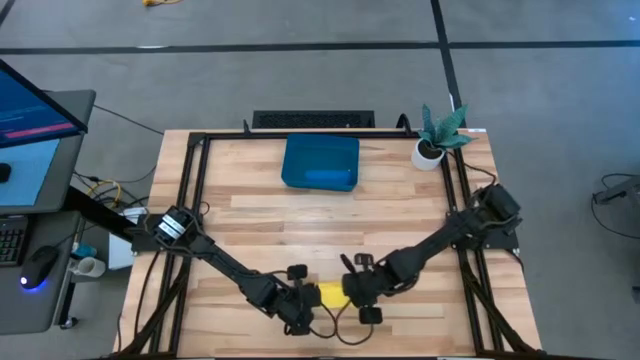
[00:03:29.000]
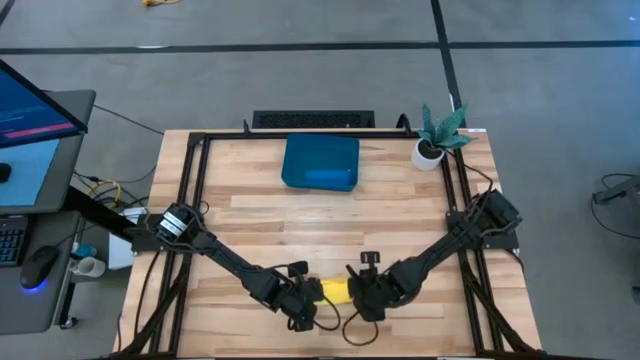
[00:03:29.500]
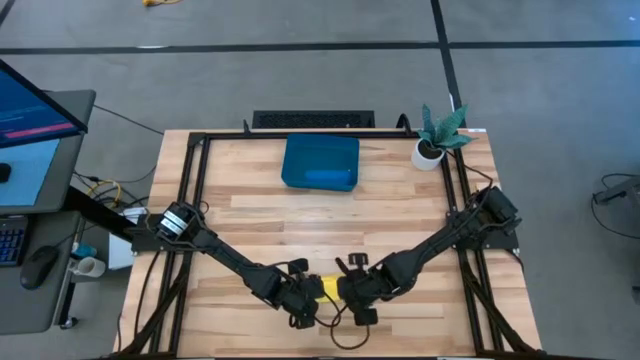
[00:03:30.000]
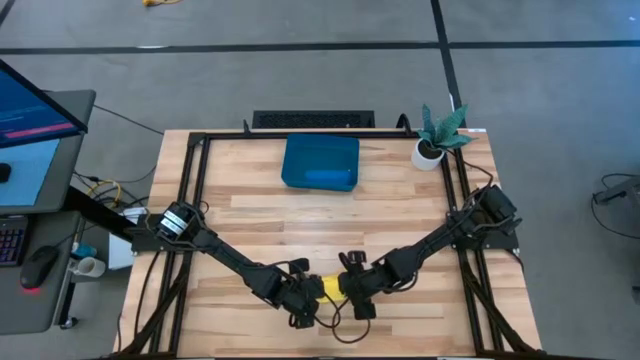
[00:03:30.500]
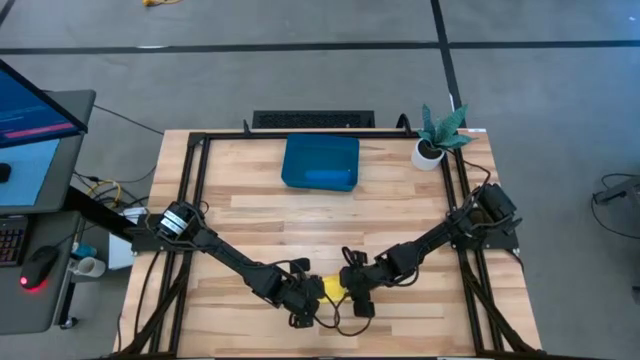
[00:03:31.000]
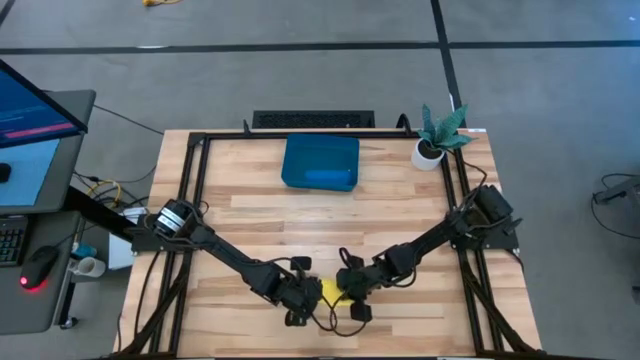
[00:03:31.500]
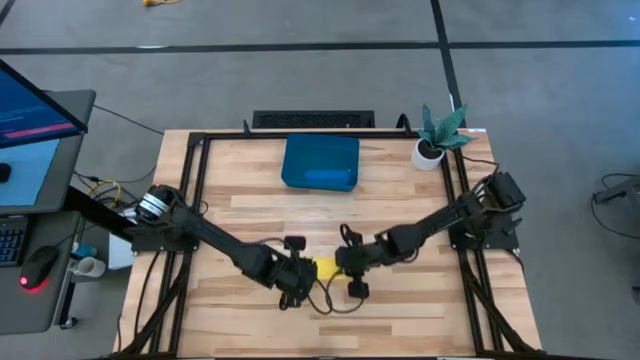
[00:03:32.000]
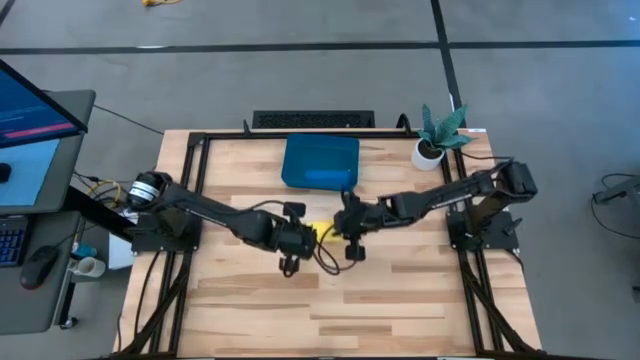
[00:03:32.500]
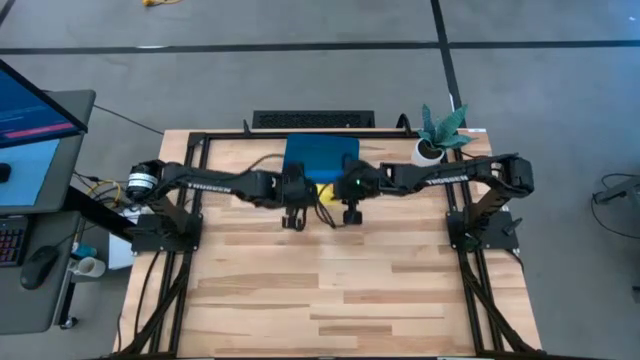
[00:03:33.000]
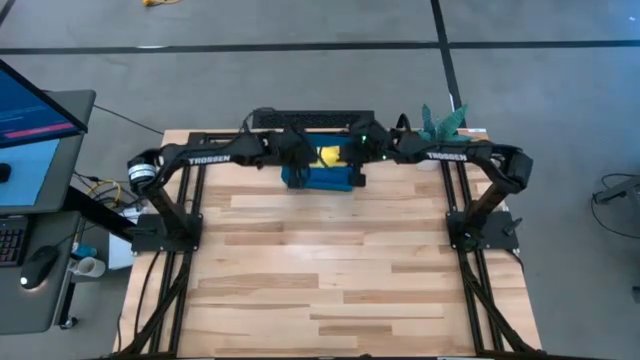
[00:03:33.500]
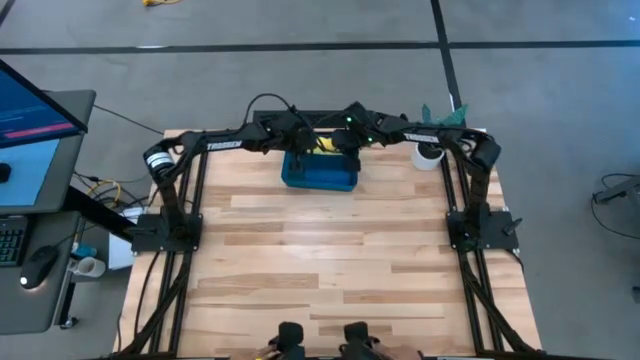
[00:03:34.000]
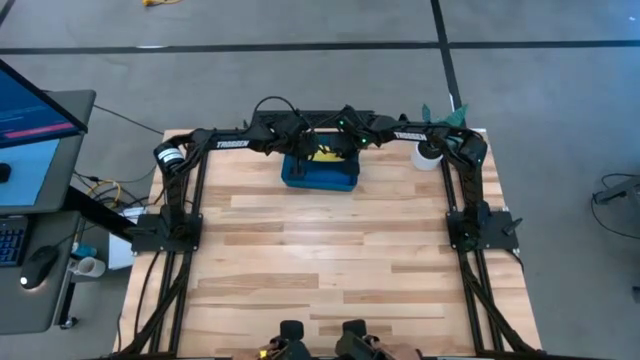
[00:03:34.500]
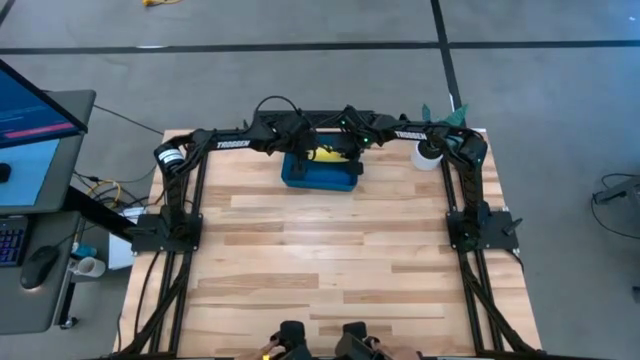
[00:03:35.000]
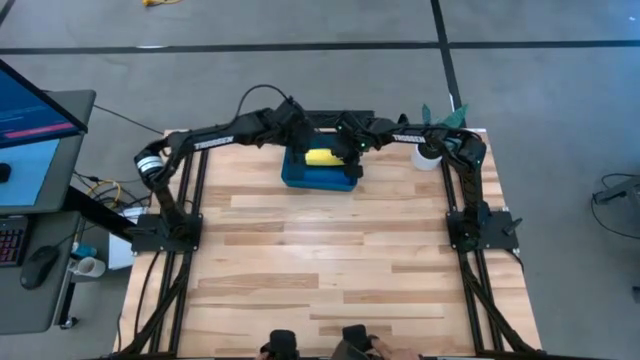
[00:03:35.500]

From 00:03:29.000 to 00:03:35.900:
Task: Roll microfiber towels into tight, uniform cylinder then place into a basket
Put the rolled yellow microfiber cloth into the blue bin

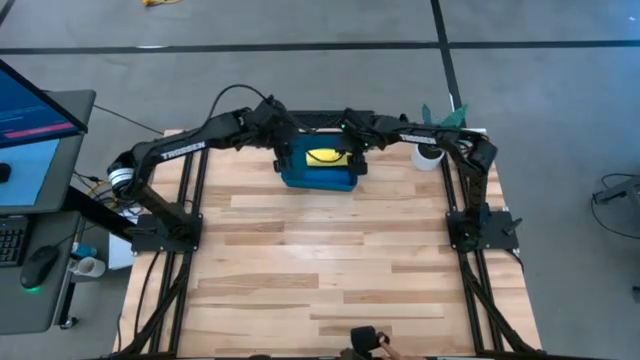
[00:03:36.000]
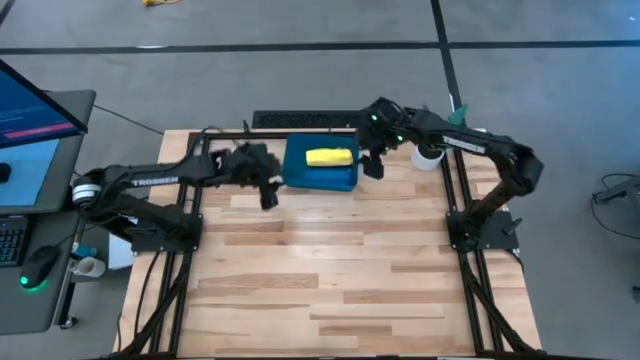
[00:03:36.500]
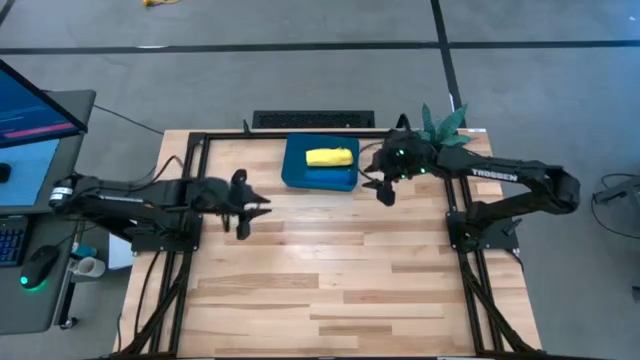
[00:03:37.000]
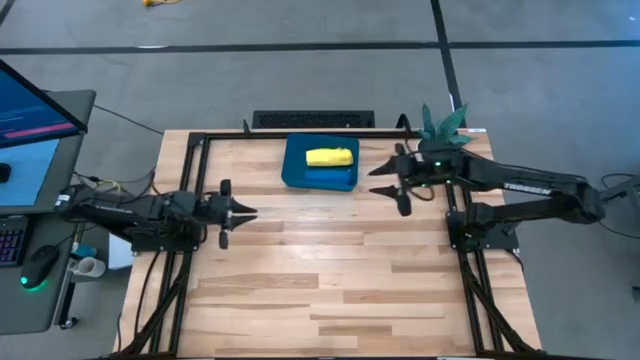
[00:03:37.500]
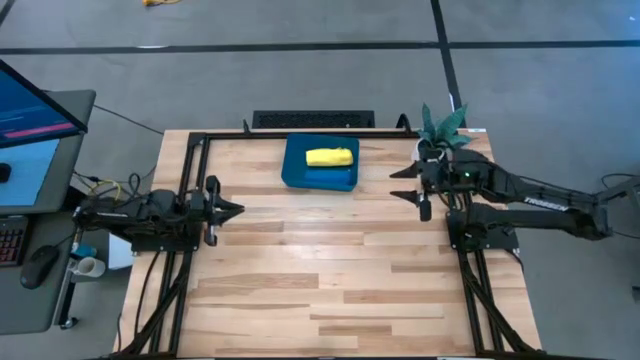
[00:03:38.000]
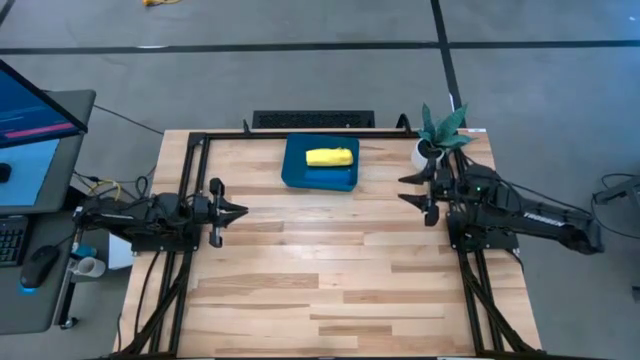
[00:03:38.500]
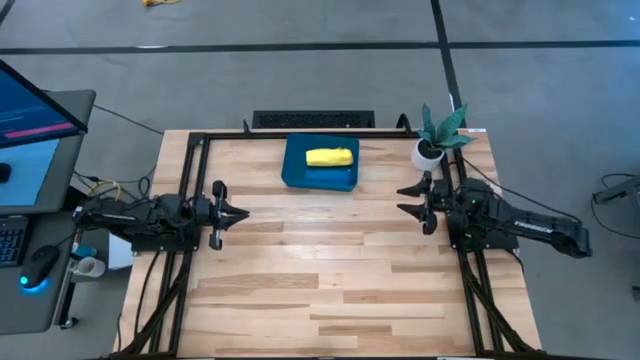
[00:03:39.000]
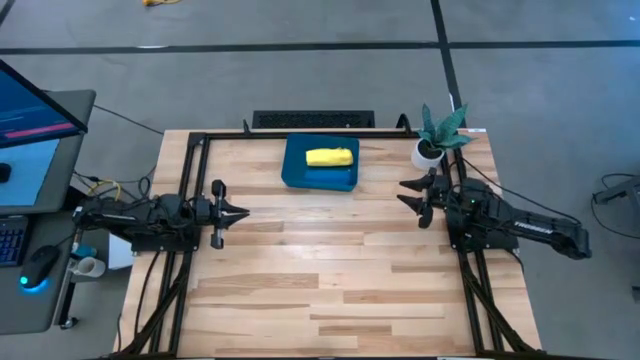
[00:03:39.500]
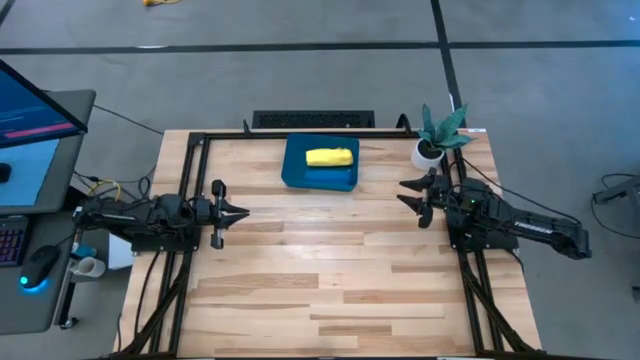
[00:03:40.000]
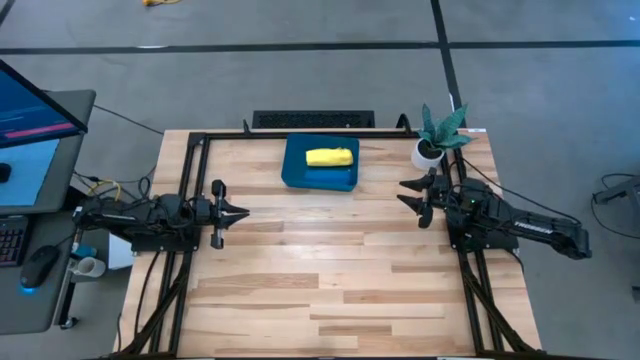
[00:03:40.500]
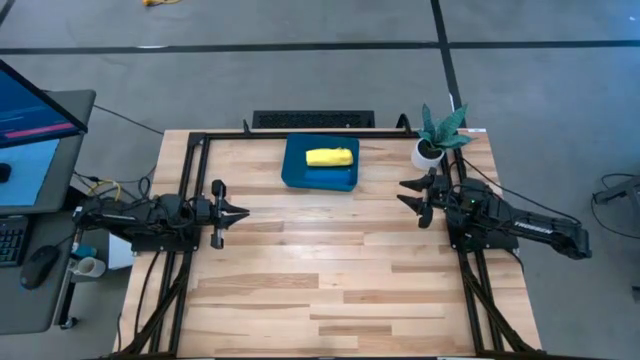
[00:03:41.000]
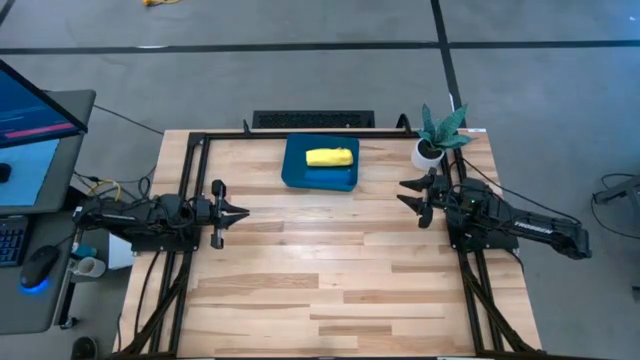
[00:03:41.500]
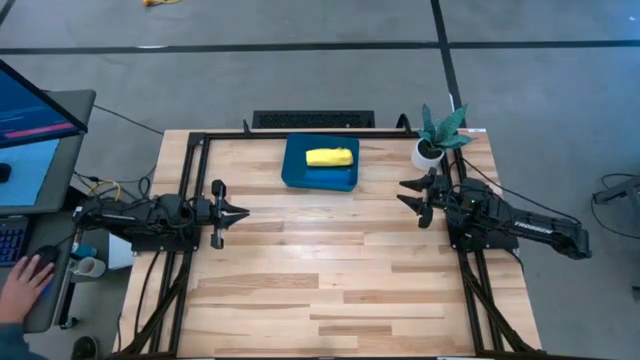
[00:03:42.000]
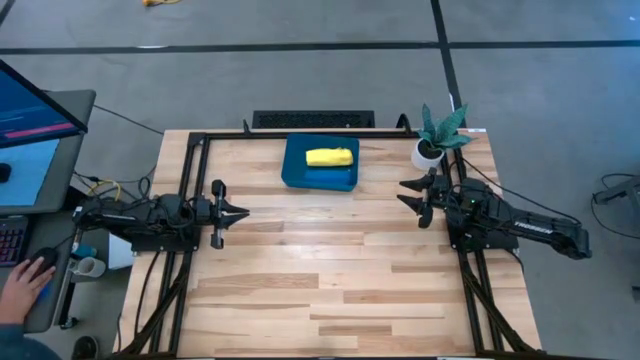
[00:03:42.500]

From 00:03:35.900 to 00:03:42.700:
Return to Home Position
